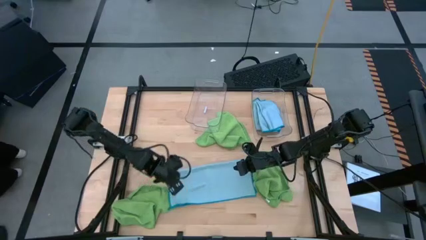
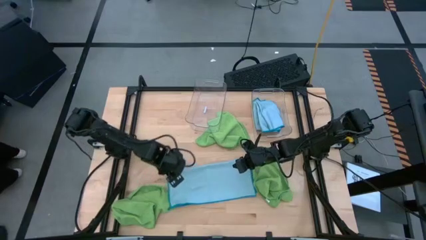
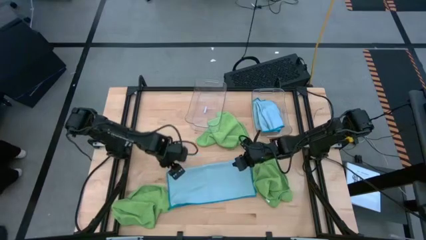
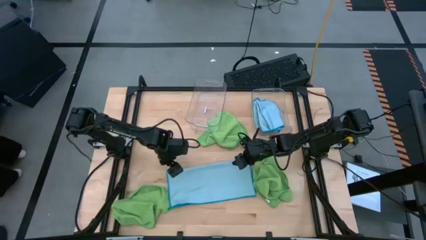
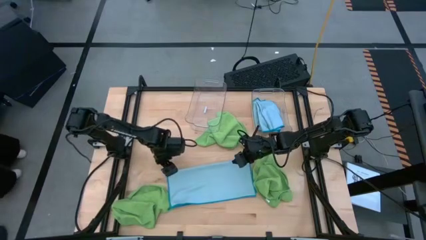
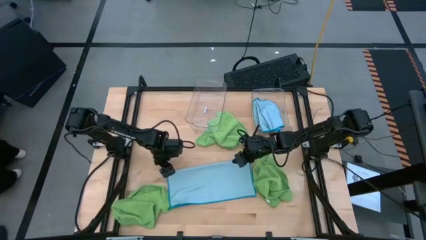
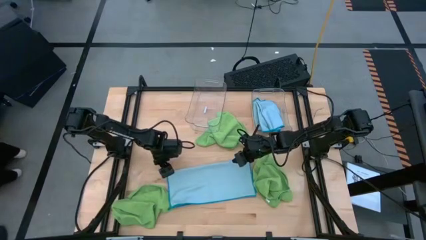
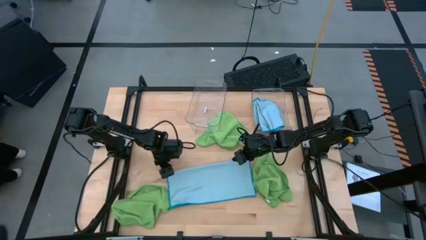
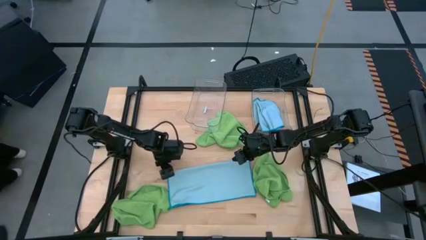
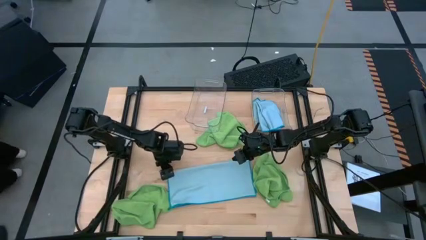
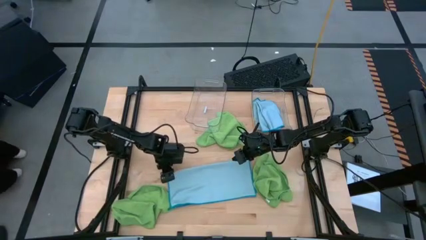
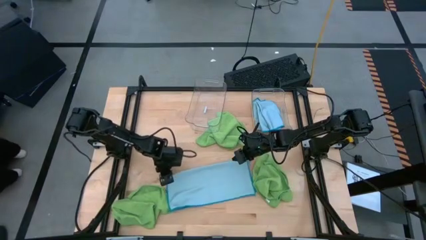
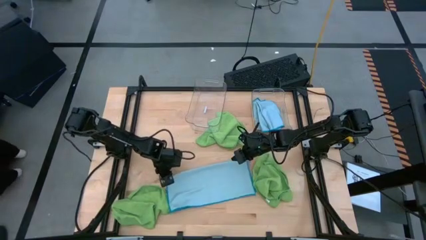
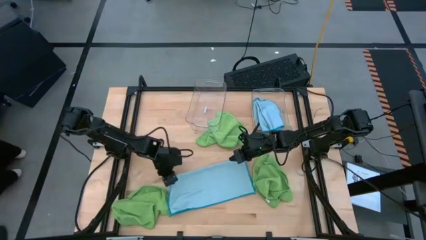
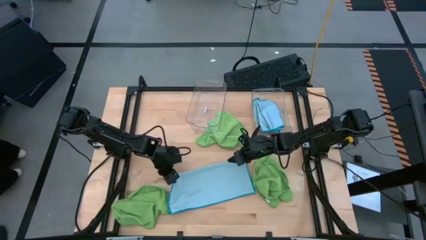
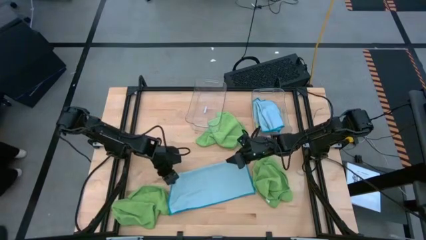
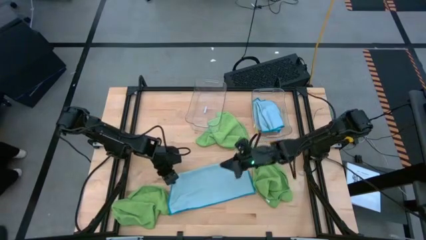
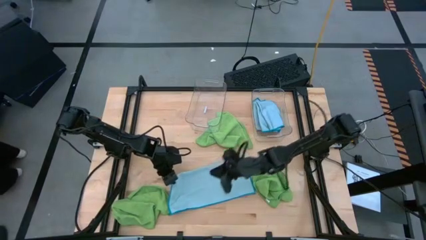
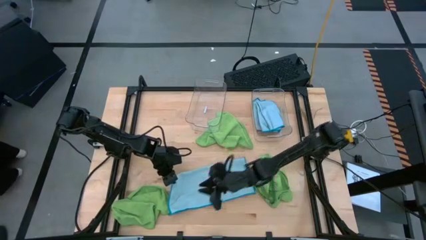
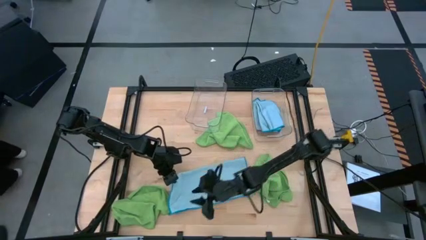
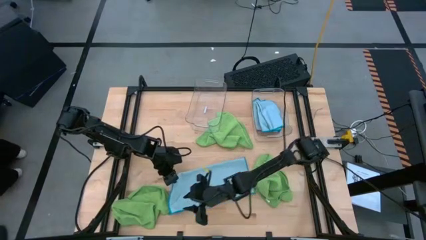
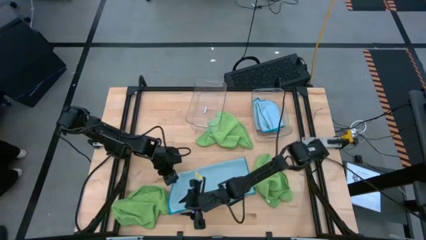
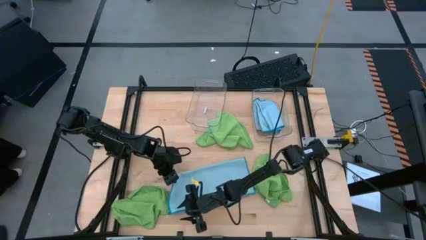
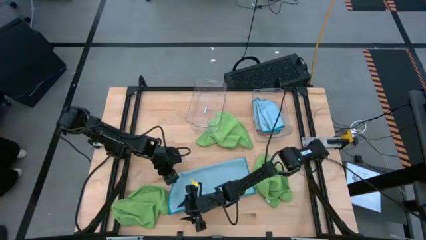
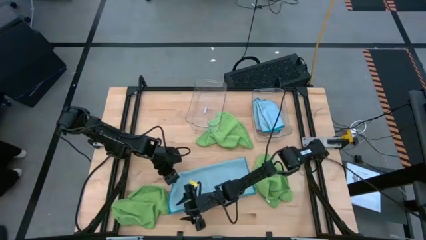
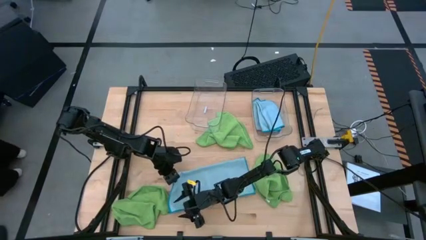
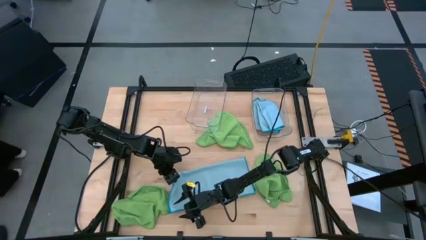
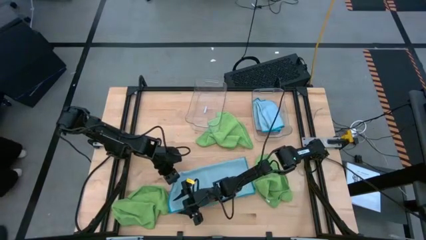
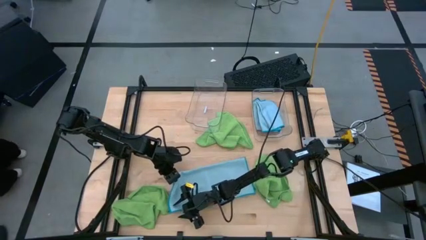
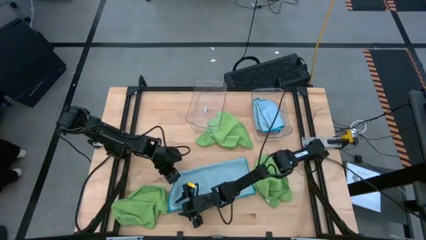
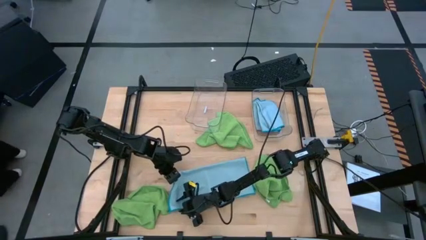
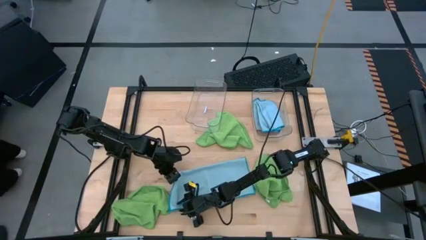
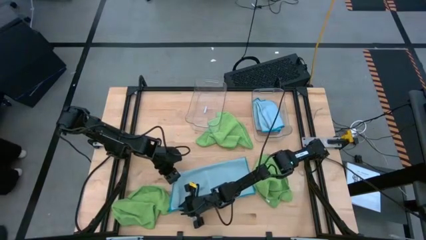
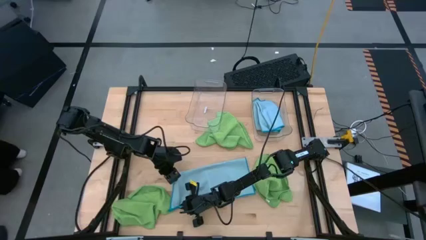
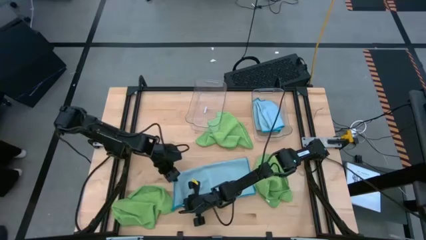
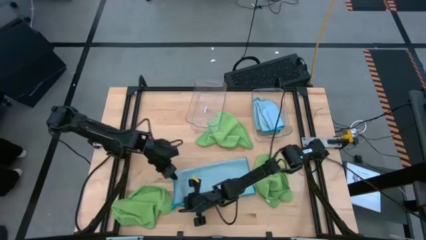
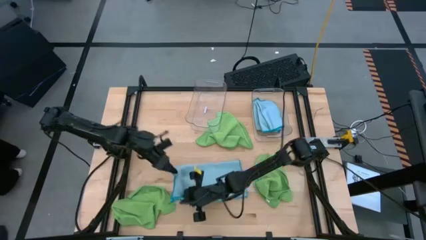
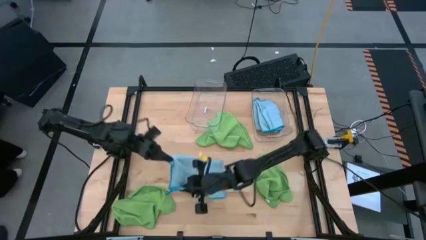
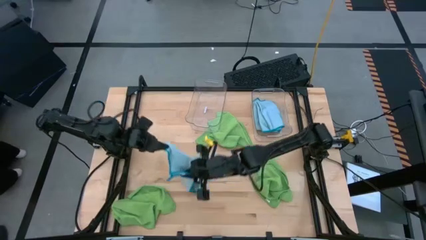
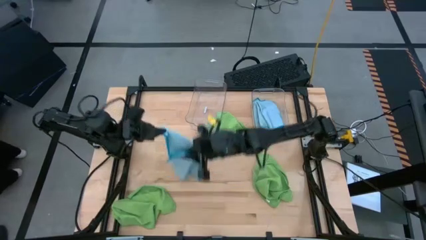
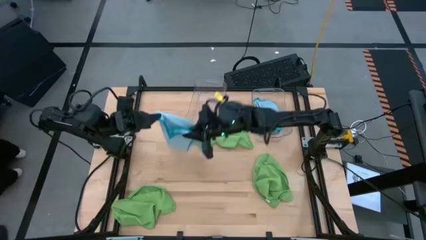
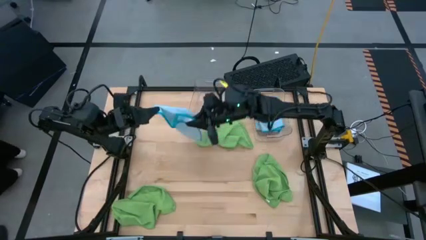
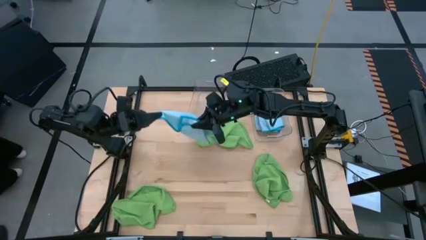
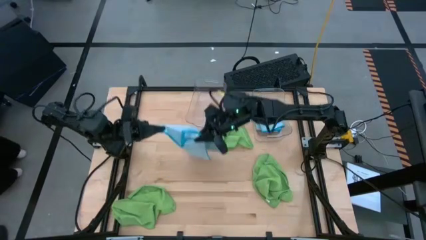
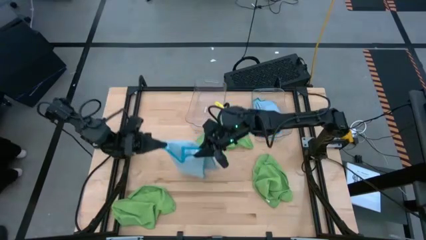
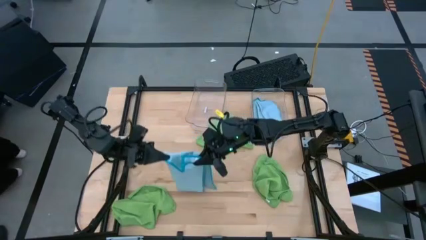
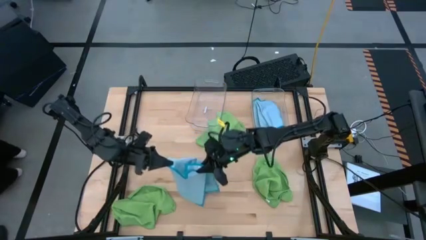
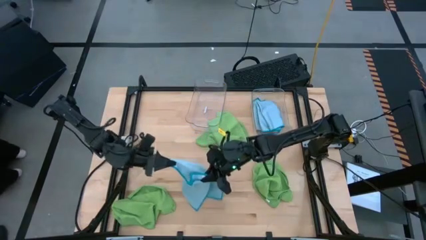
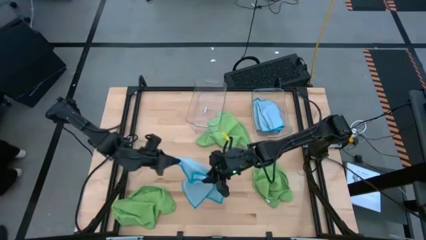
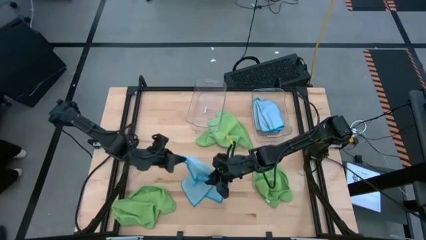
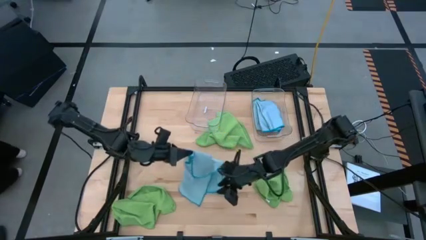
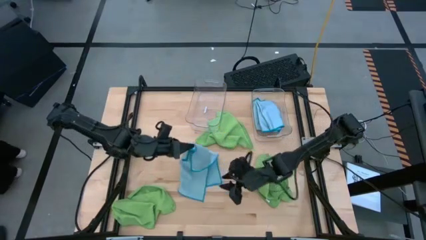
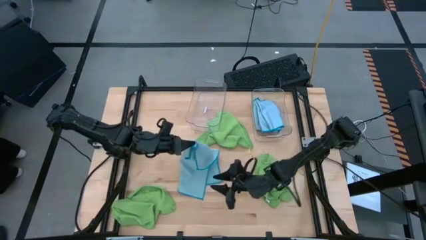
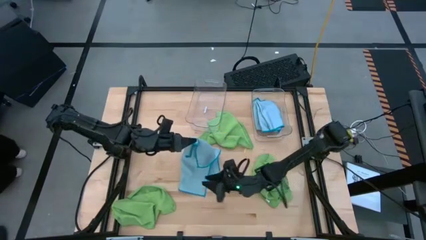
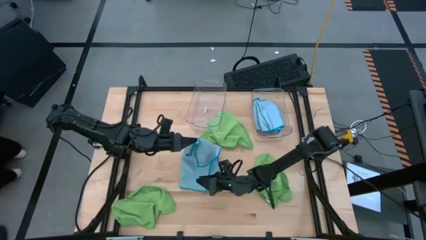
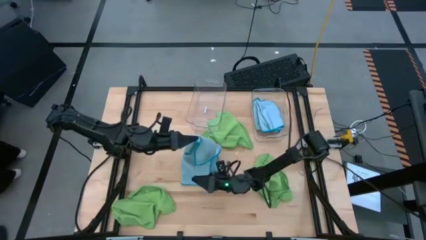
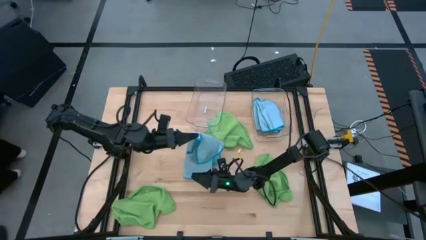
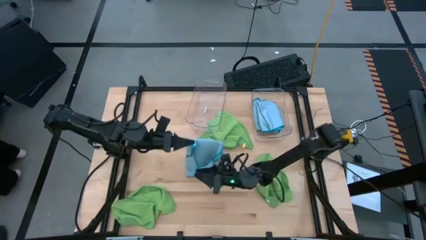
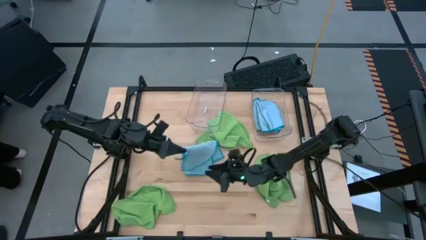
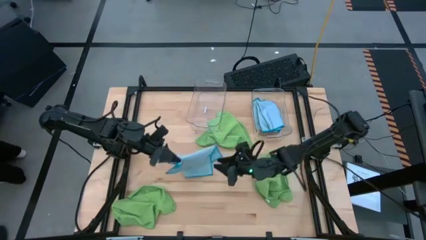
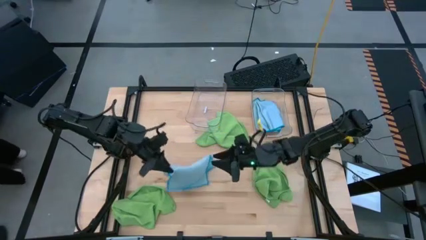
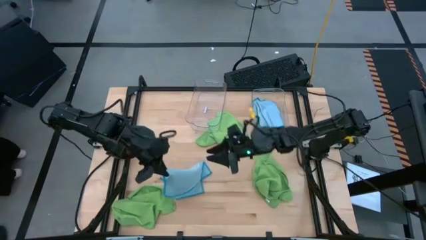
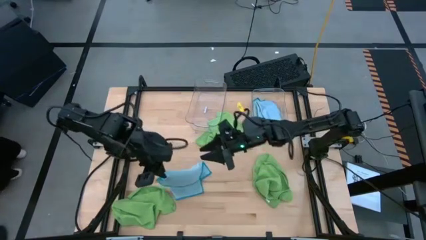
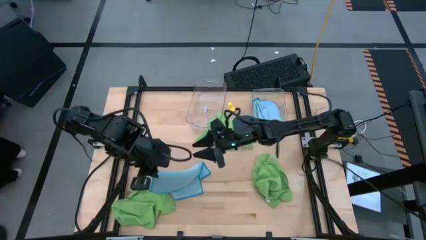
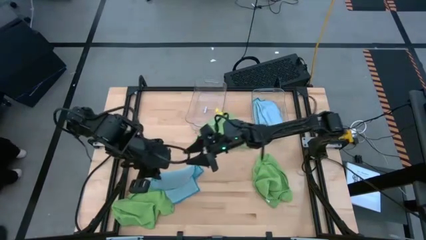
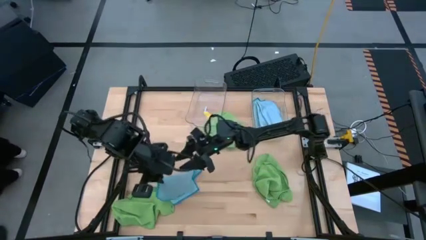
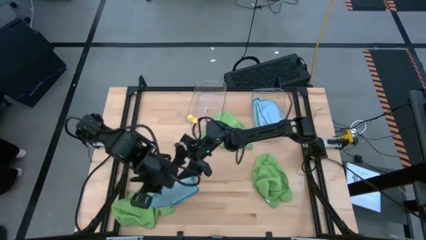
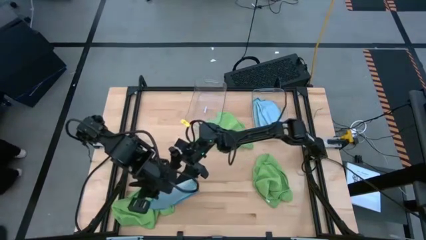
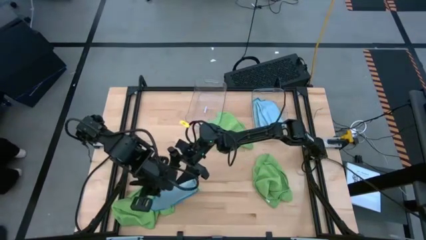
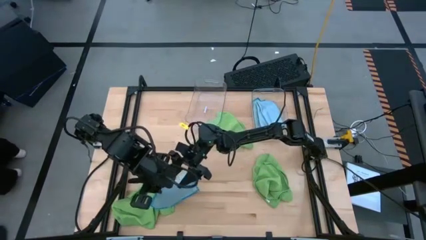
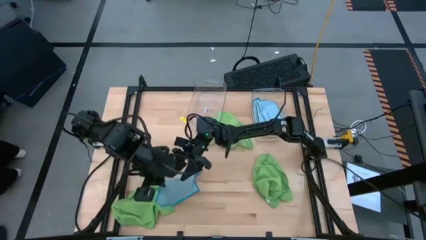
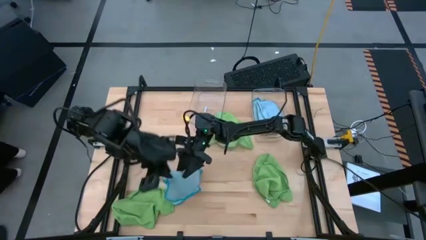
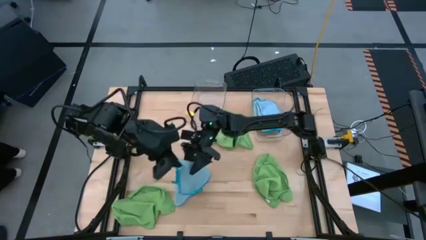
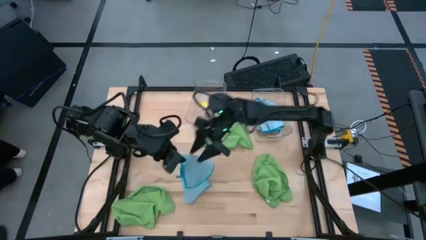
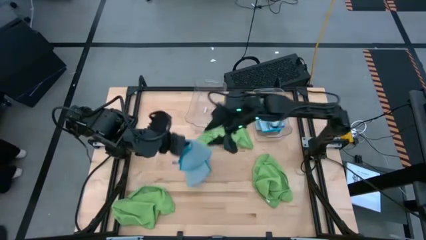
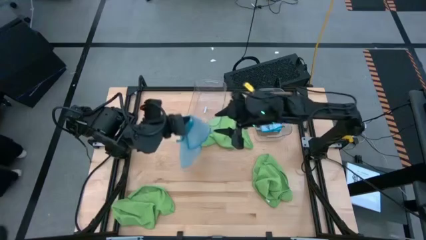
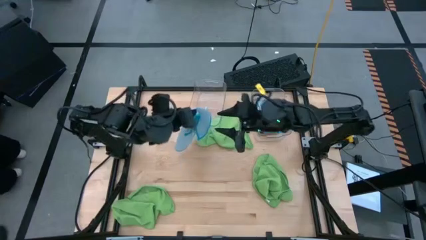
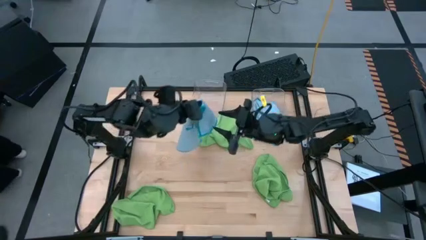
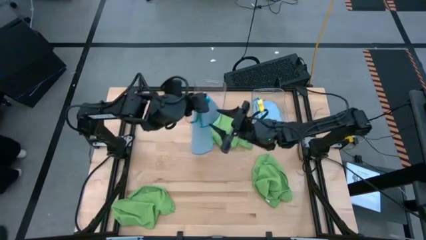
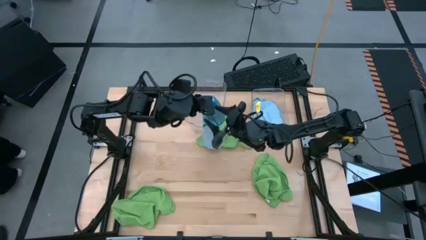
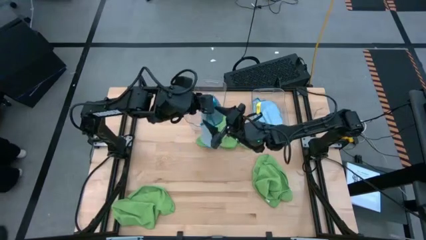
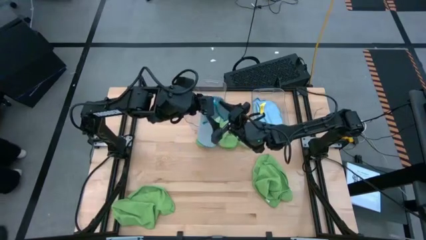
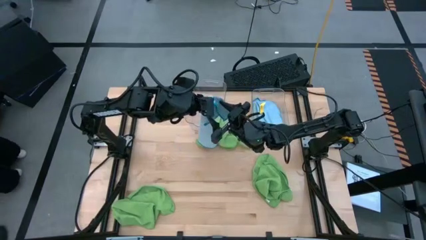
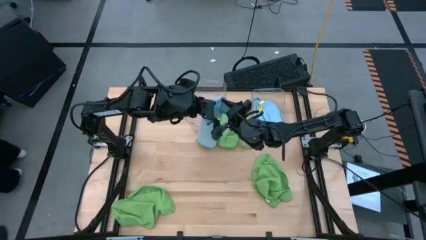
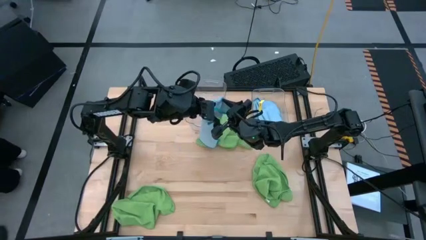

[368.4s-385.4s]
Task: Fold microfiber towels
Fold the blue microfiber towel
